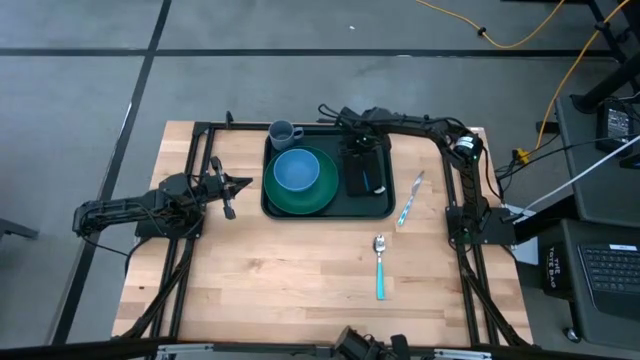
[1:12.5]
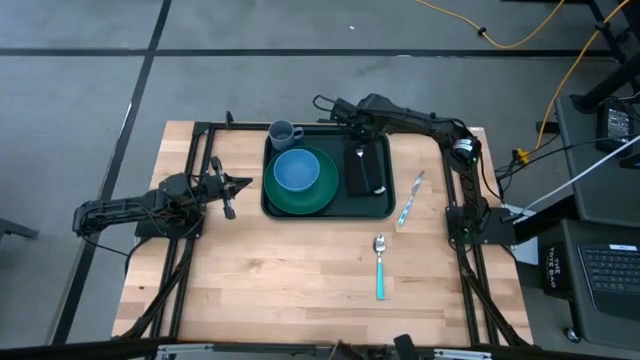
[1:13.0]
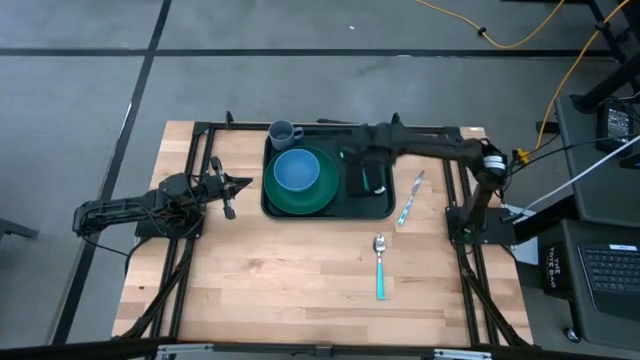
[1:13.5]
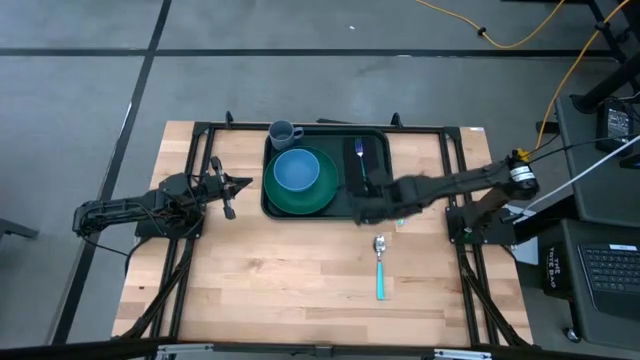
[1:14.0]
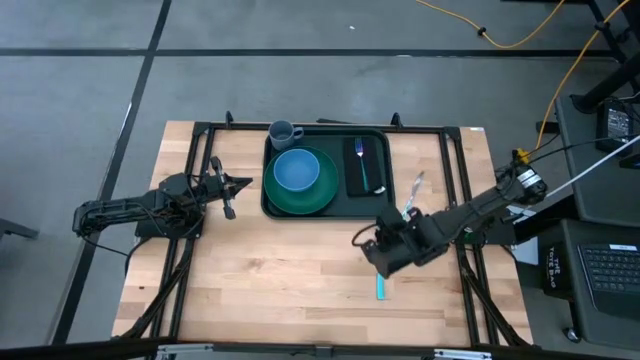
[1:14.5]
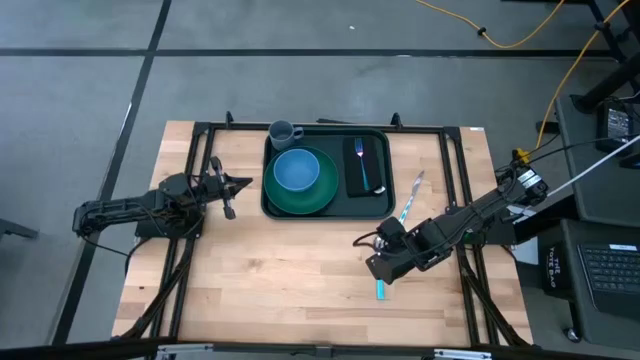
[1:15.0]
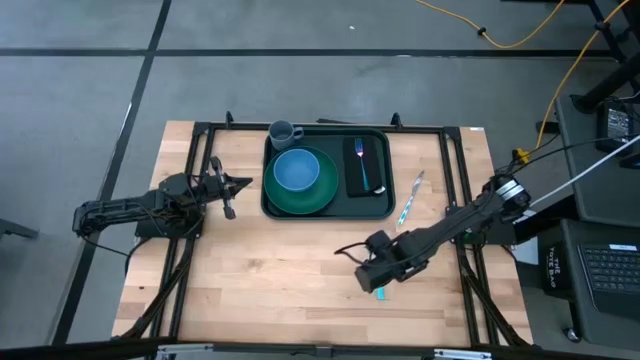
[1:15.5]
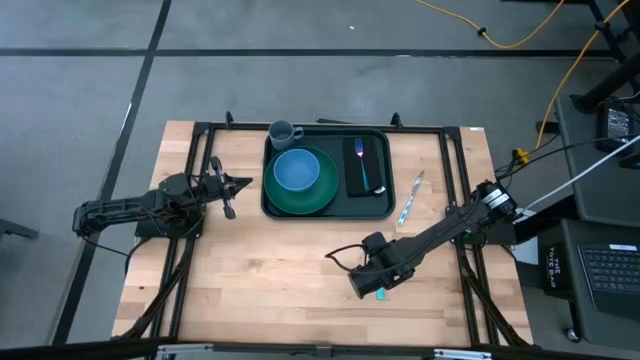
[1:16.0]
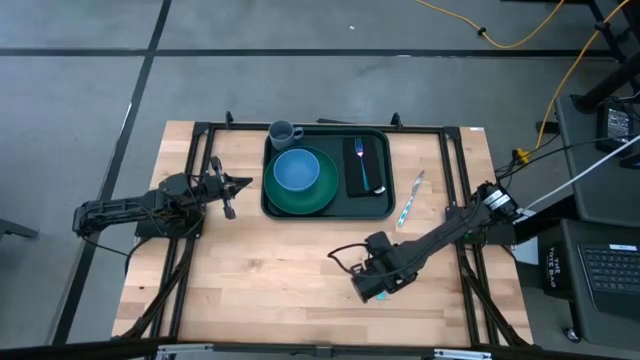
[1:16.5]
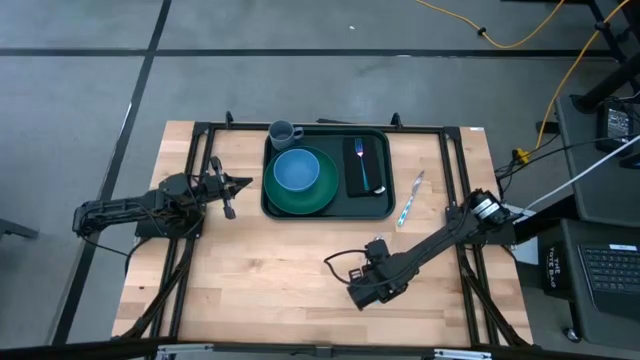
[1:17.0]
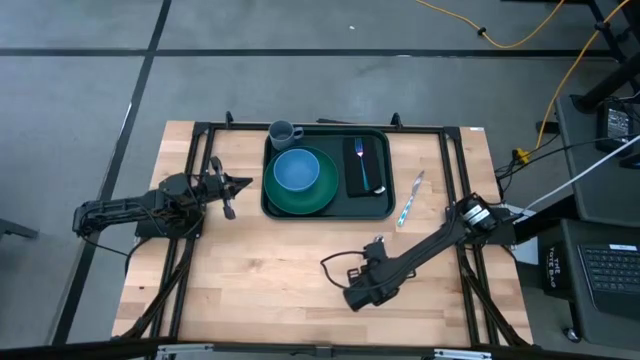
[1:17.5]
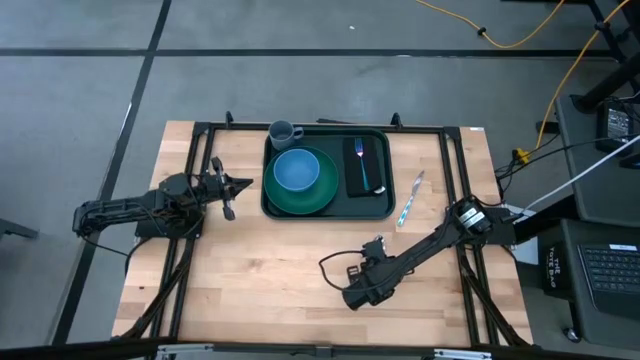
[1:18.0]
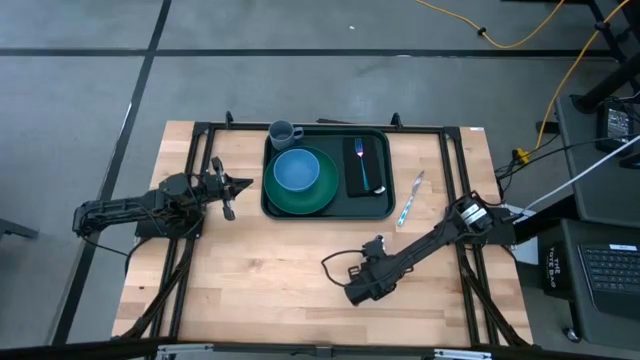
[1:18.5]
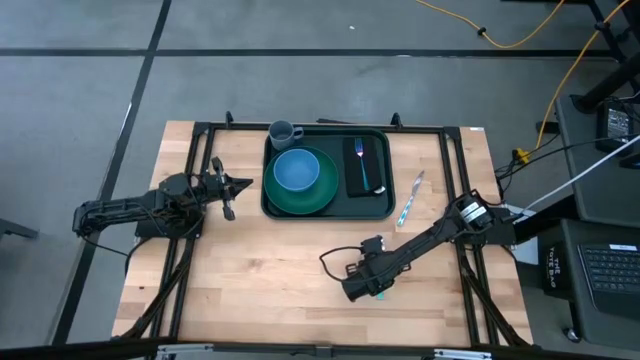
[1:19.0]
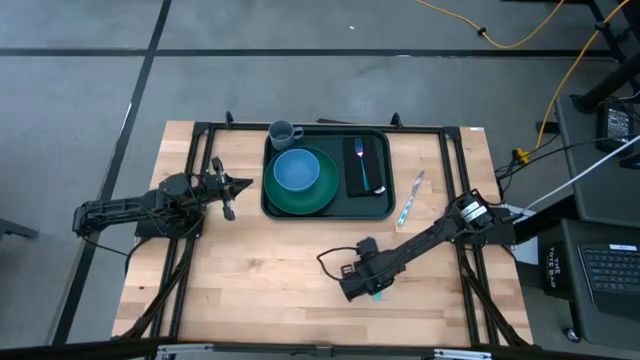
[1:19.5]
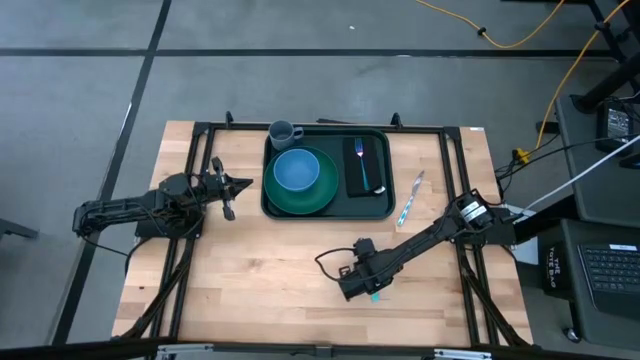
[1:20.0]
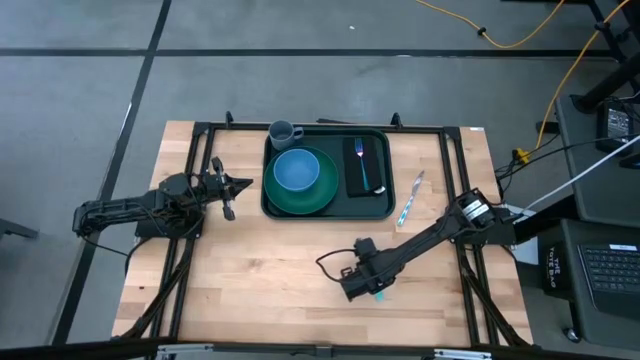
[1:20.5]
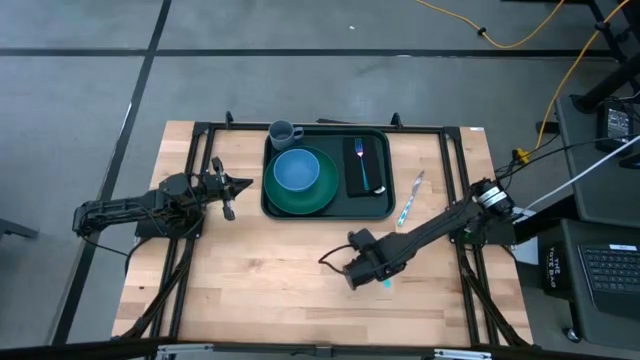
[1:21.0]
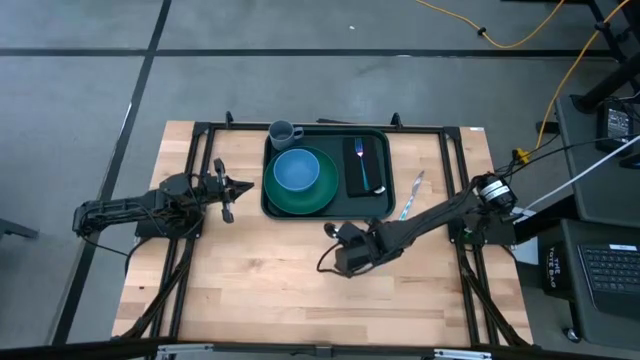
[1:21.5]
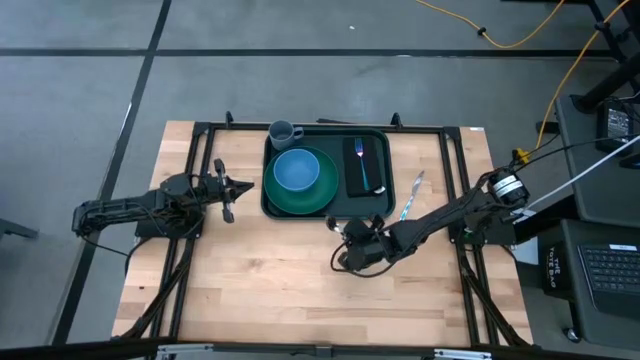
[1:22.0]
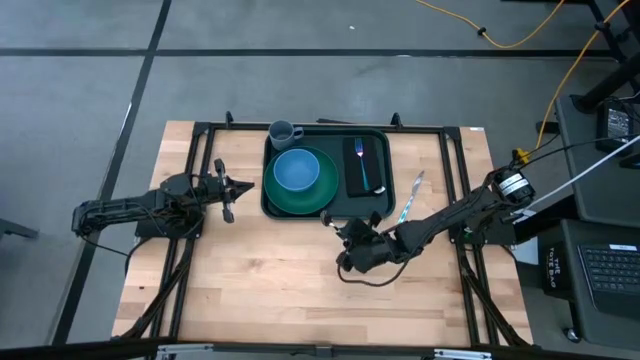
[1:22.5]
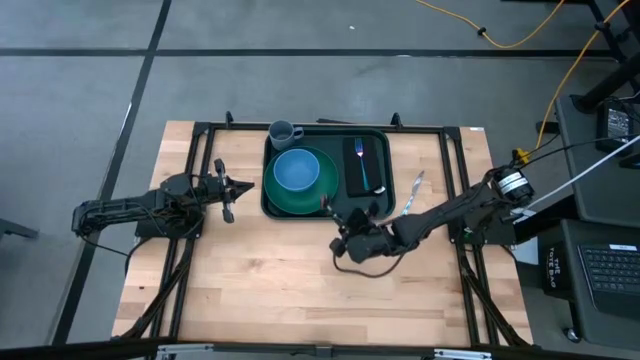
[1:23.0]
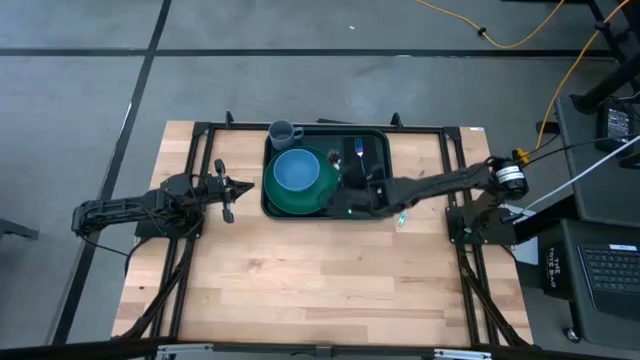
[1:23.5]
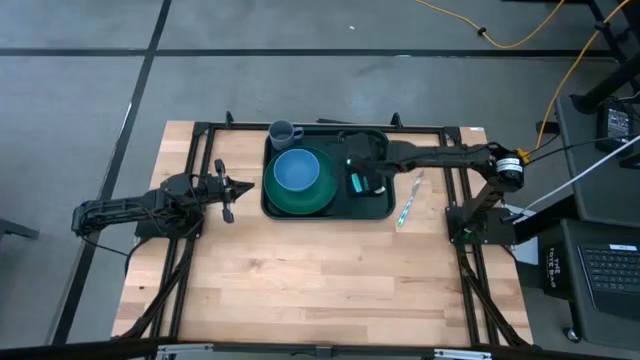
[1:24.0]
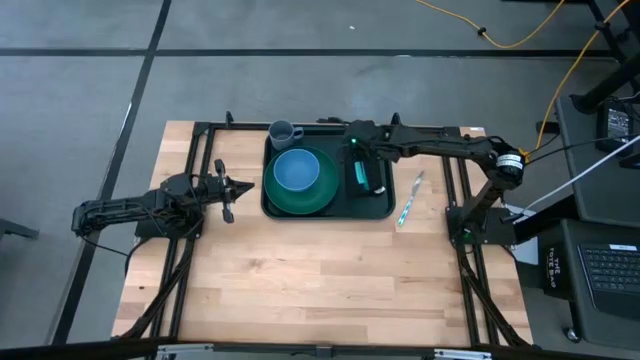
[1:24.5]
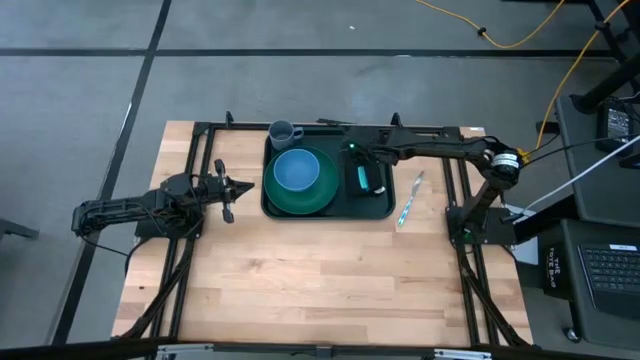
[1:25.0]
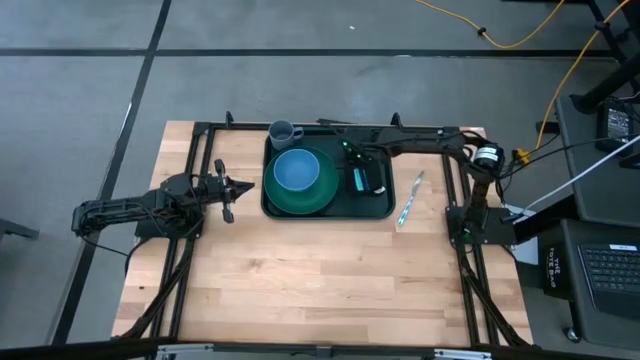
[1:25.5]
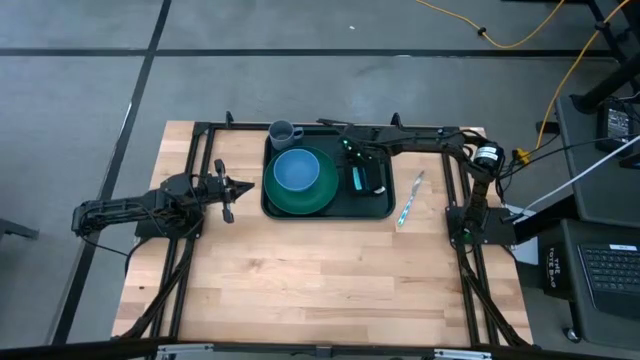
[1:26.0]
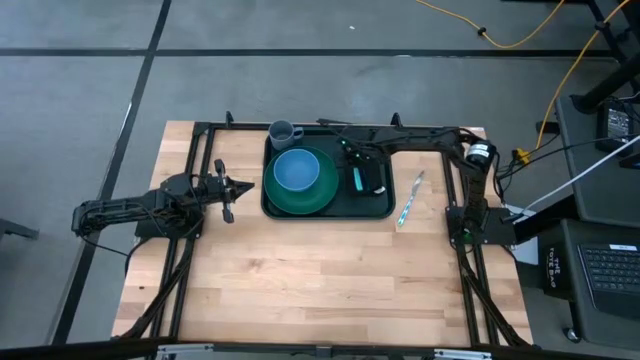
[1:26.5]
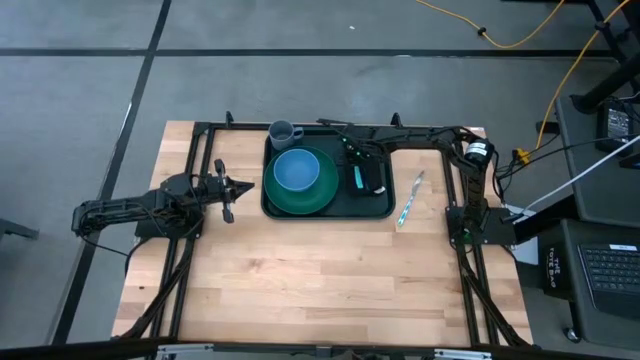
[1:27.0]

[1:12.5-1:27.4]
Task: Set up tray
Put the blue spoon on the black napkin to the left of the blue fork on the green serving tray

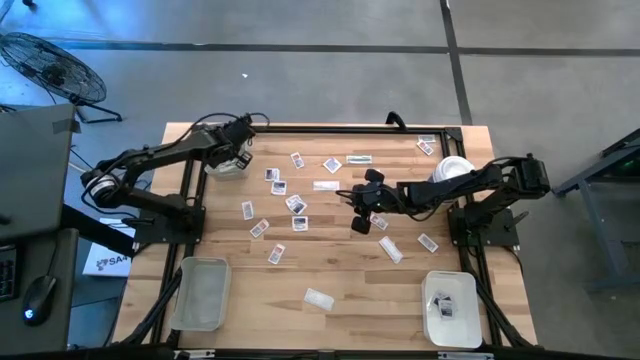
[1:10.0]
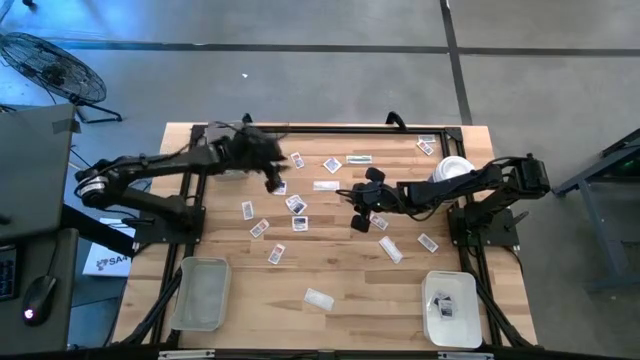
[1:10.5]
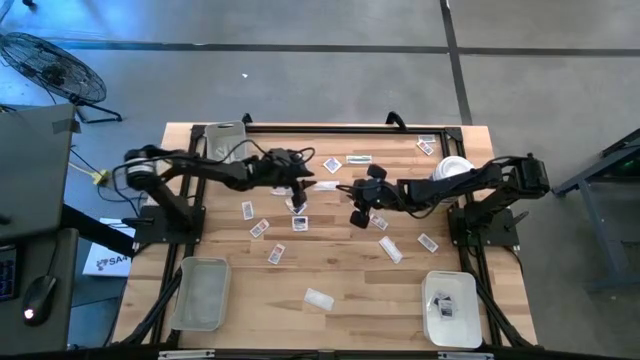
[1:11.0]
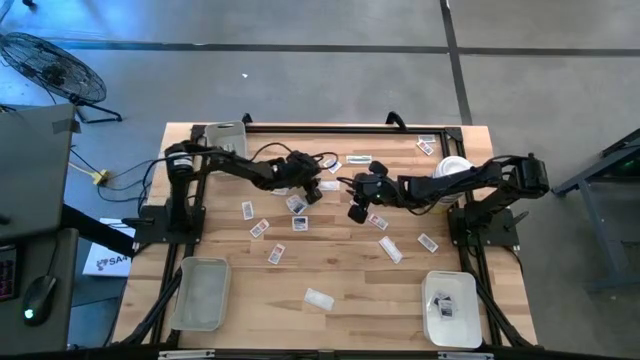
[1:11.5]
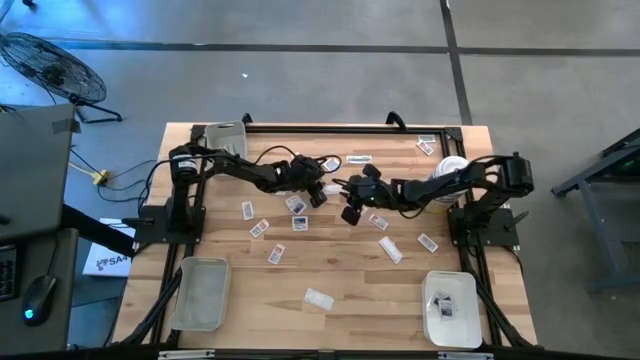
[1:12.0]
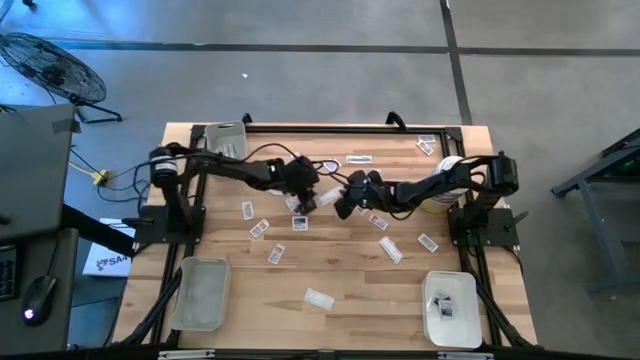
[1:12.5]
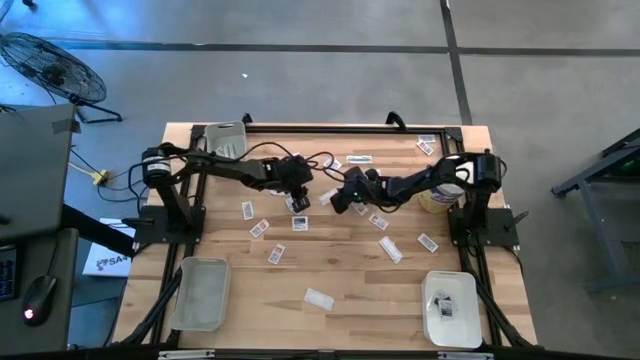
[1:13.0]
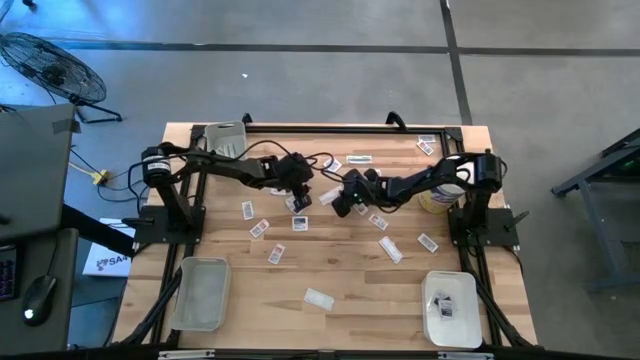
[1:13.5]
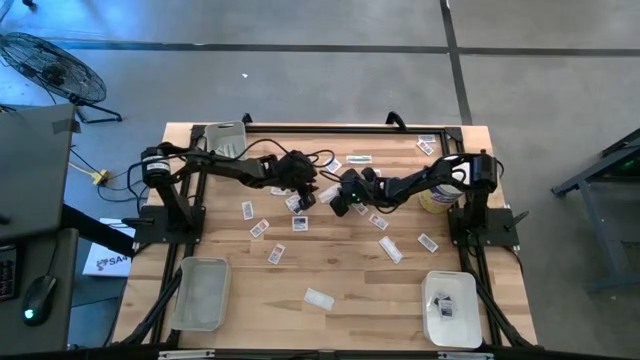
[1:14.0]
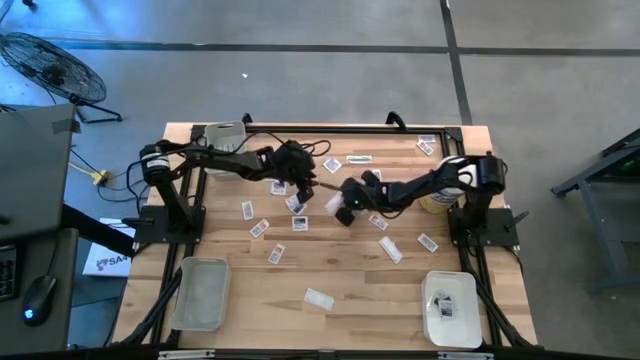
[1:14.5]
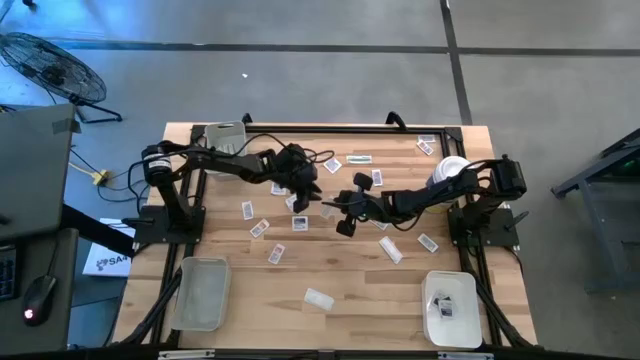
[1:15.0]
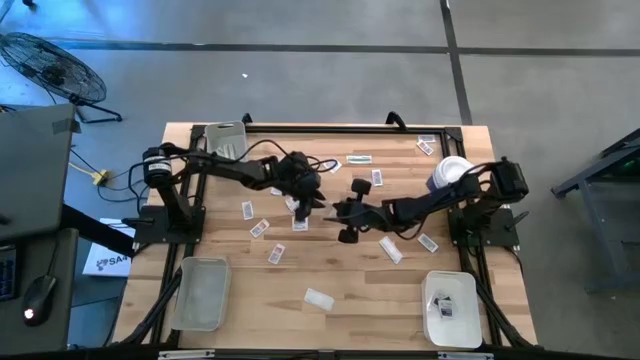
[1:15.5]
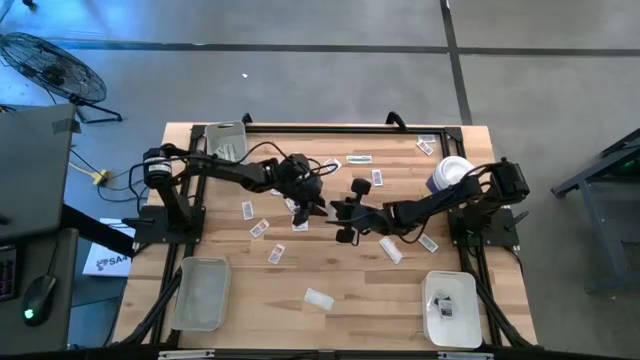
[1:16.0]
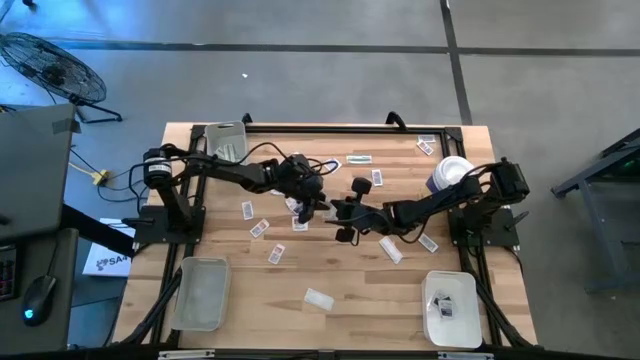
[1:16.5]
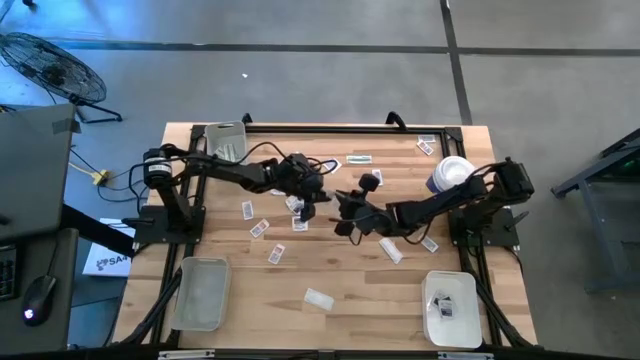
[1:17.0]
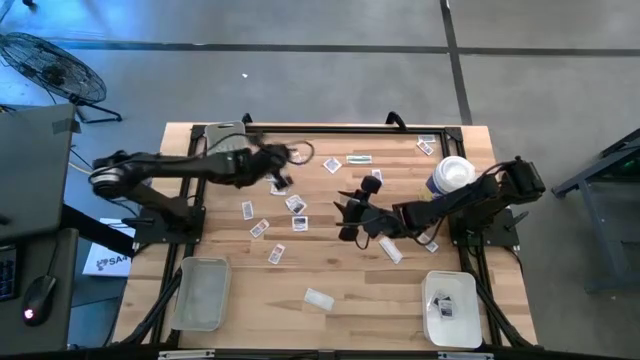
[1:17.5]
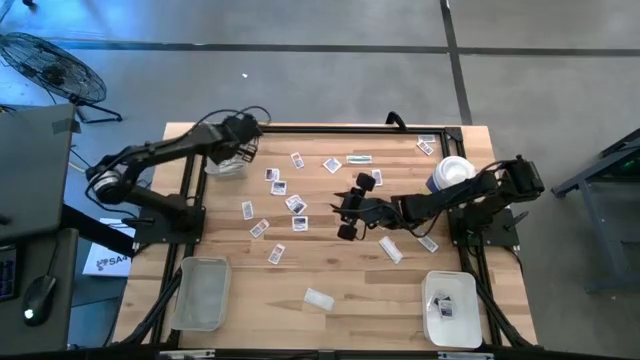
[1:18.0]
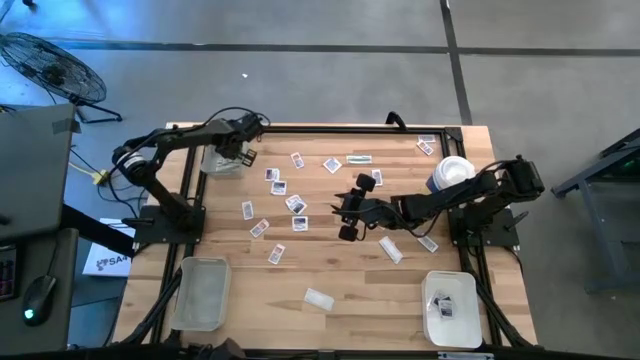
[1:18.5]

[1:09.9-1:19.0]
Task: Pick & Place First Aid Supplies
Put the green bandage pack into the top gray bin
